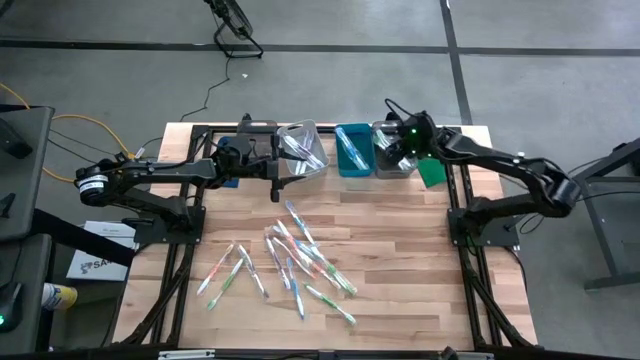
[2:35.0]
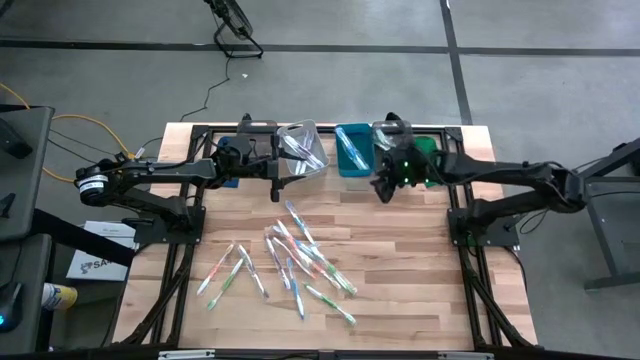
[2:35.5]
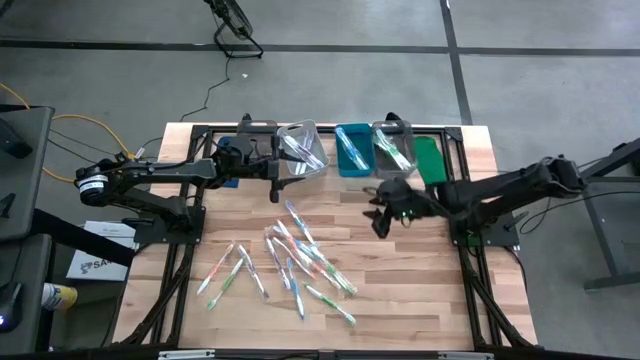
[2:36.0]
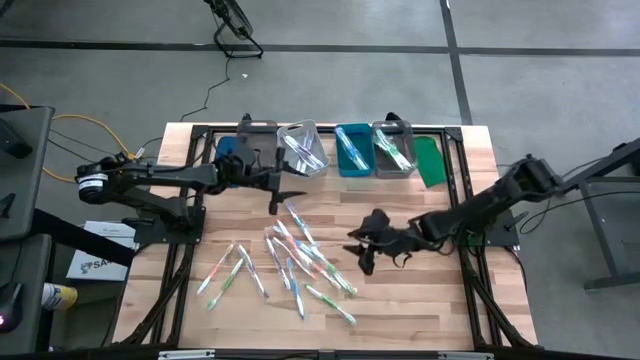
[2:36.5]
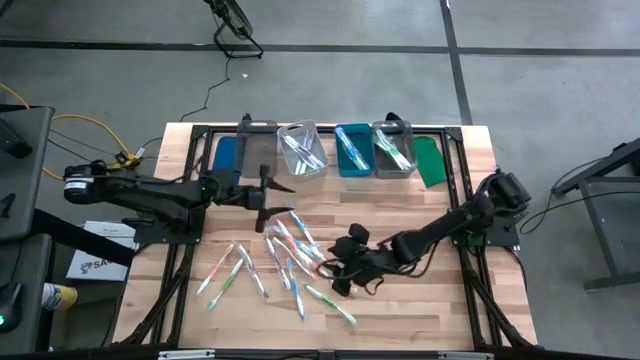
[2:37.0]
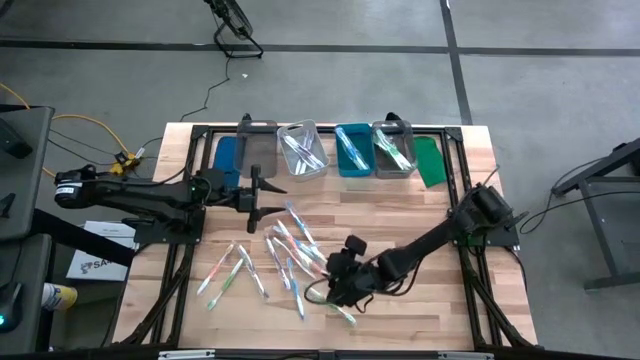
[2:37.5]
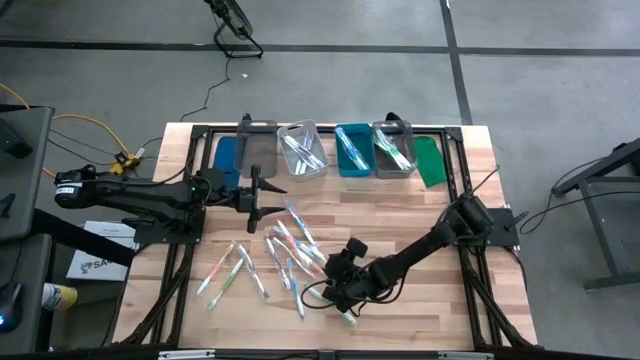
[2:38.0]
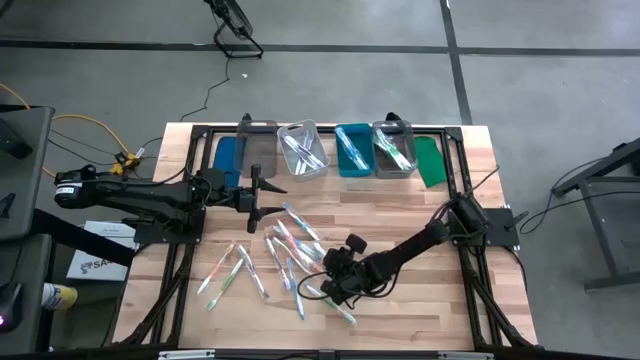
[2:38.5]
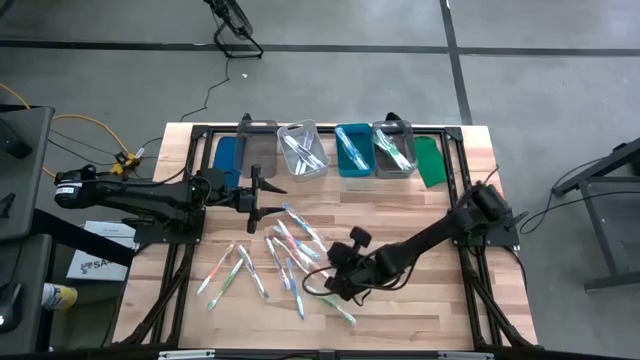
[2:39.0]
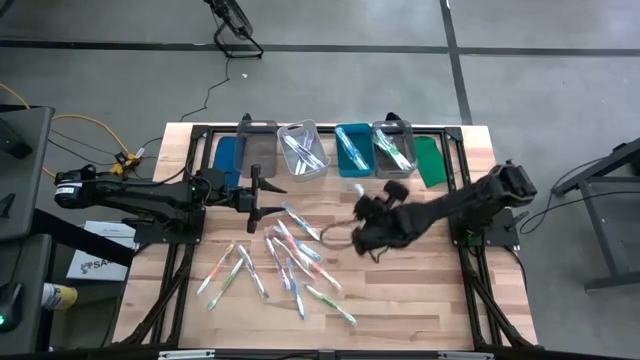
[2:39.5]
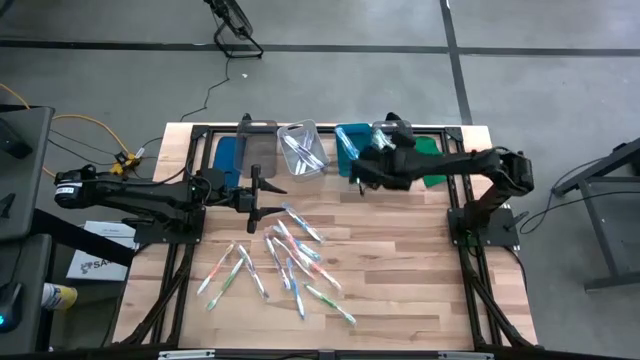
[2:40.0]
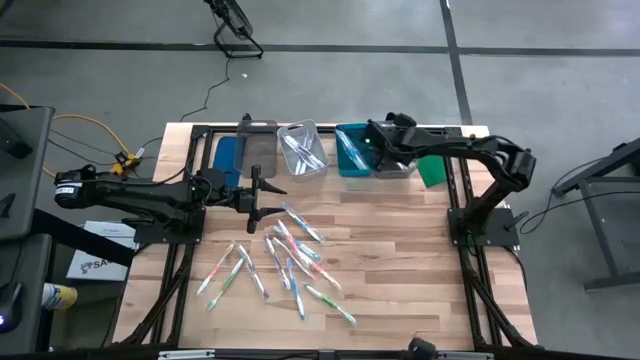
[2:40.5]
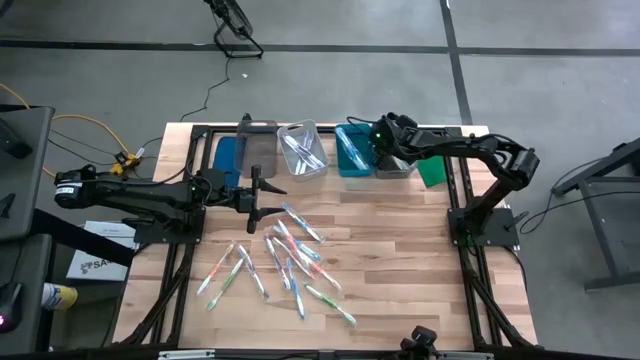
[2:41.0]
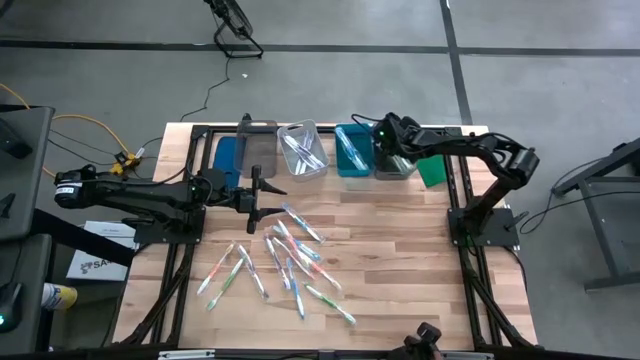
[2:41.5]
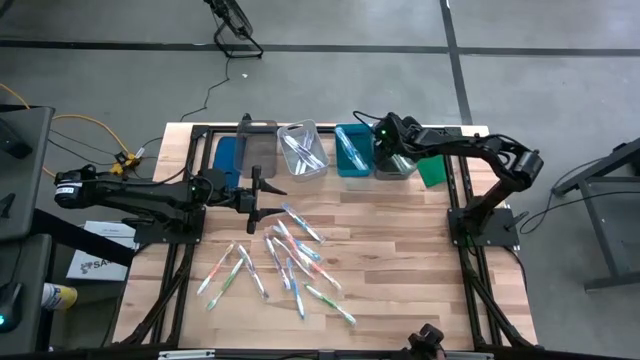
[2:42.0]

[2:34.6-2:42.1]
Task: Pick & Place Toothbrushes
Put the green toothbrush into the right black bin

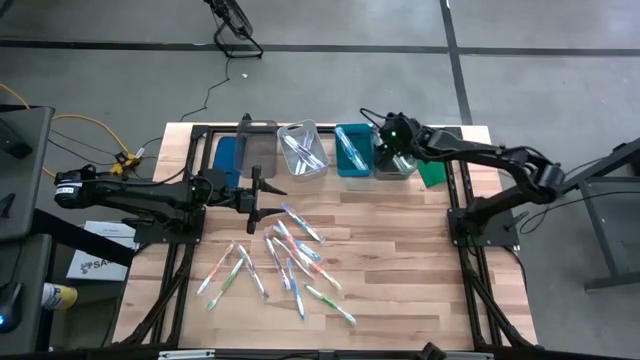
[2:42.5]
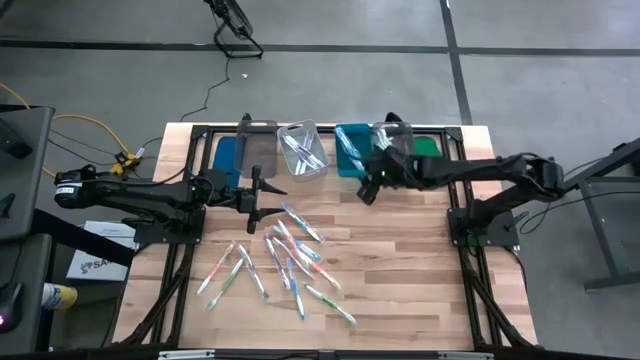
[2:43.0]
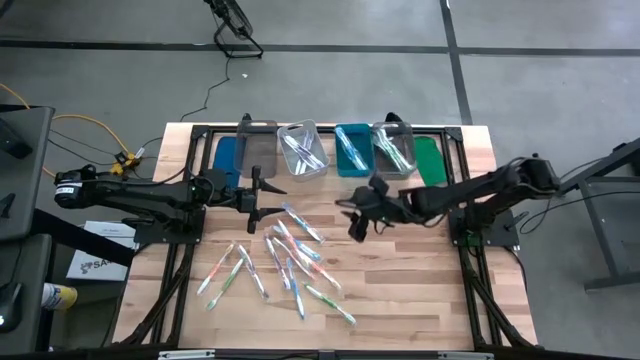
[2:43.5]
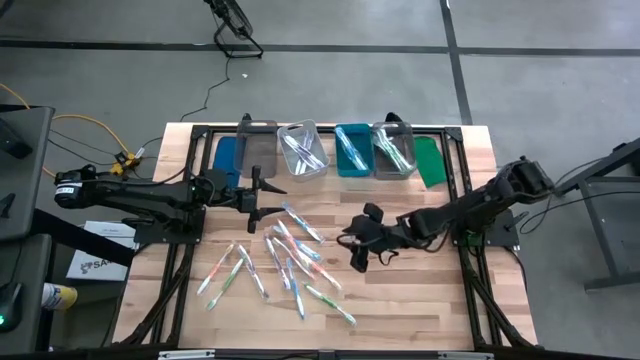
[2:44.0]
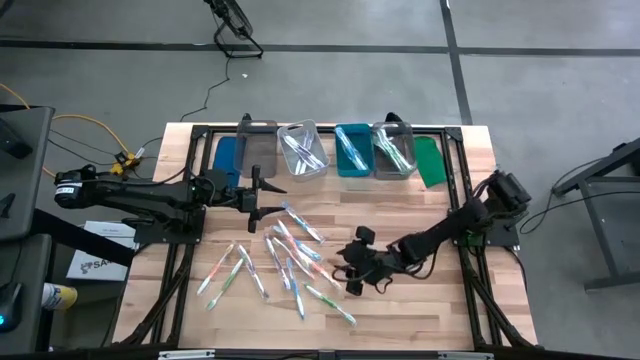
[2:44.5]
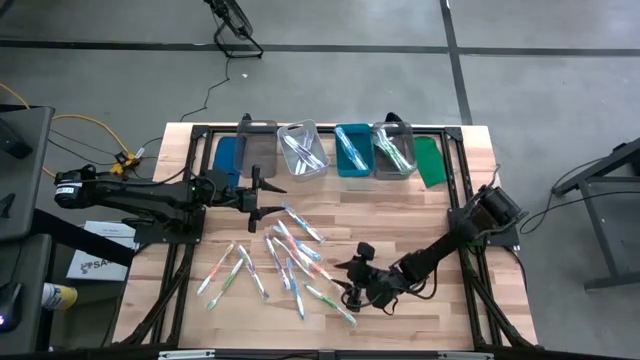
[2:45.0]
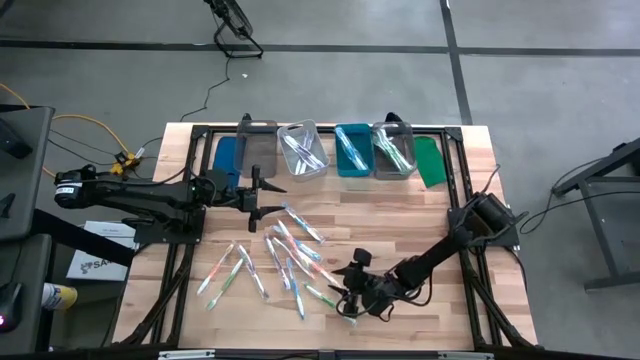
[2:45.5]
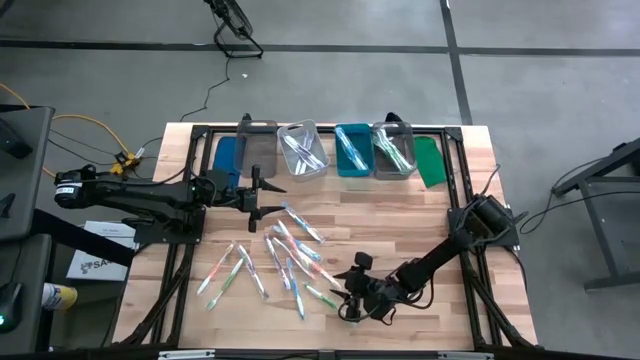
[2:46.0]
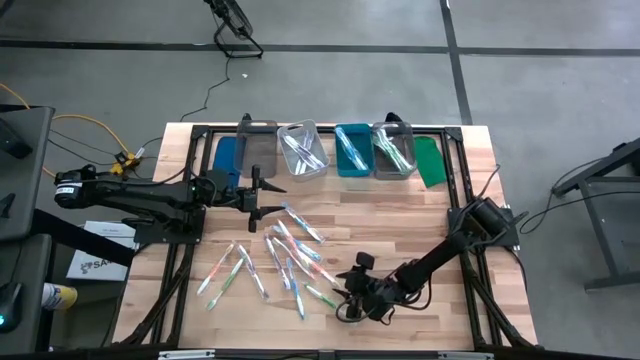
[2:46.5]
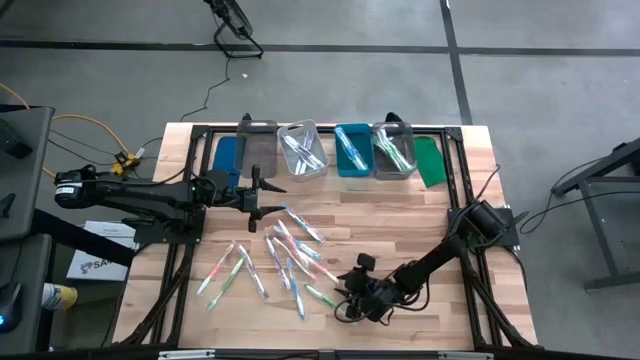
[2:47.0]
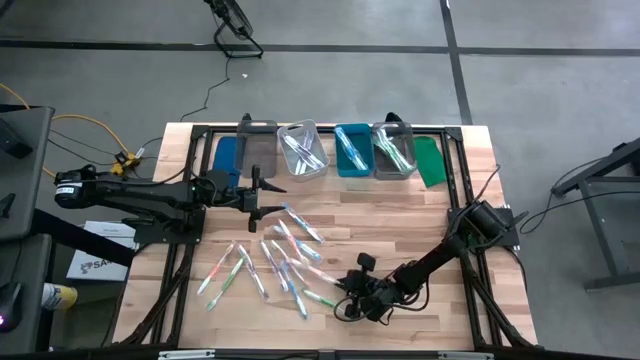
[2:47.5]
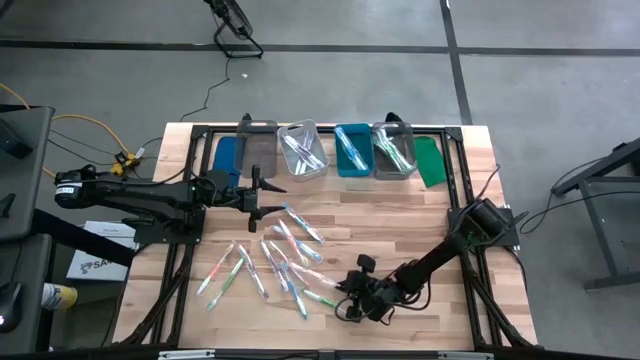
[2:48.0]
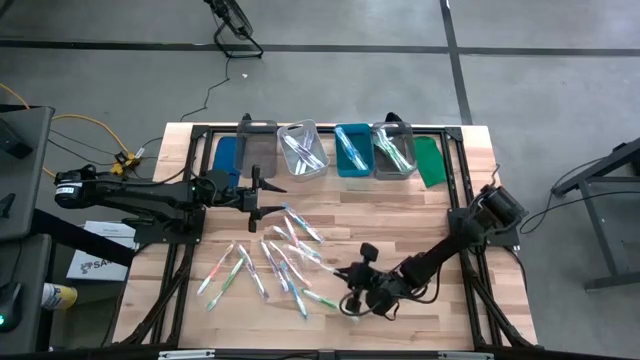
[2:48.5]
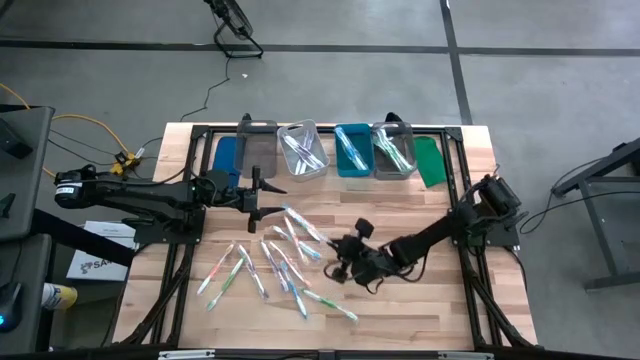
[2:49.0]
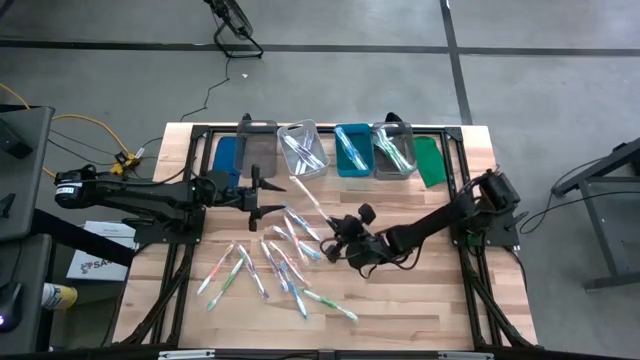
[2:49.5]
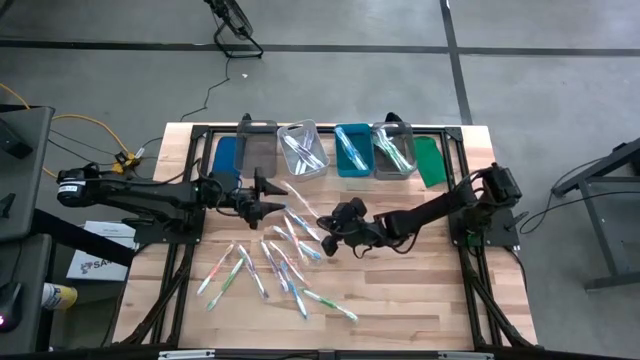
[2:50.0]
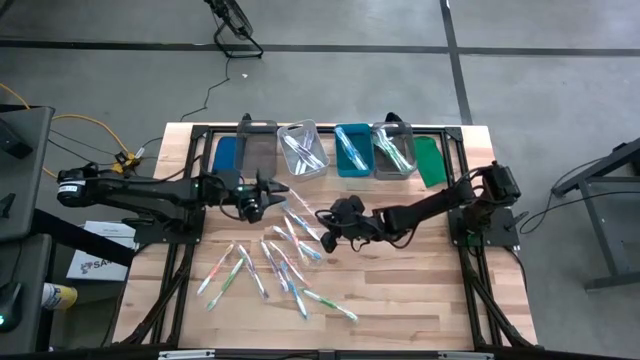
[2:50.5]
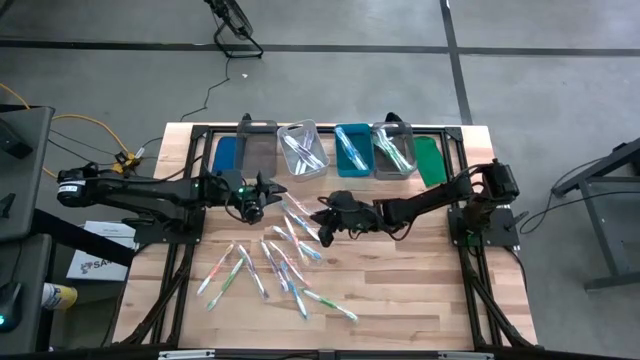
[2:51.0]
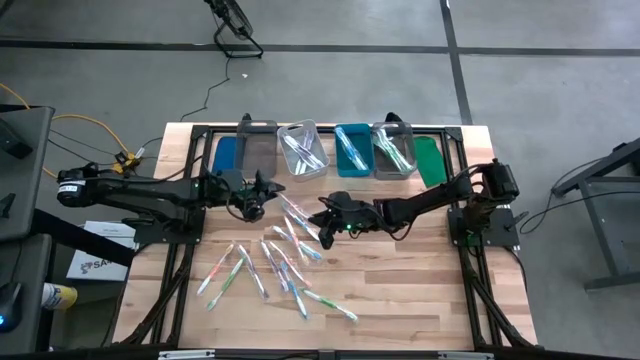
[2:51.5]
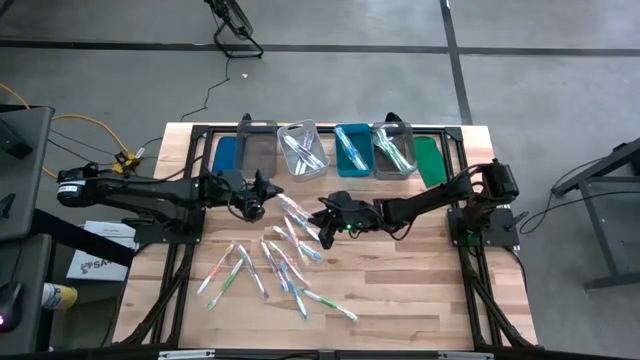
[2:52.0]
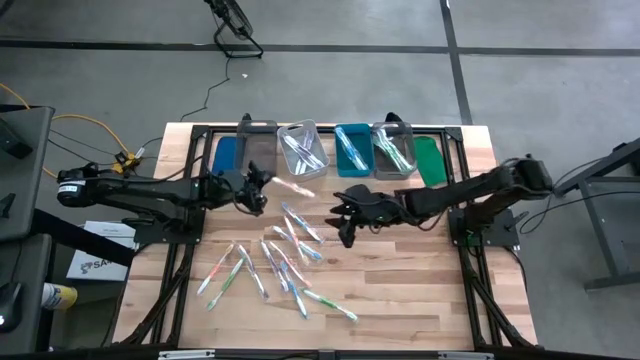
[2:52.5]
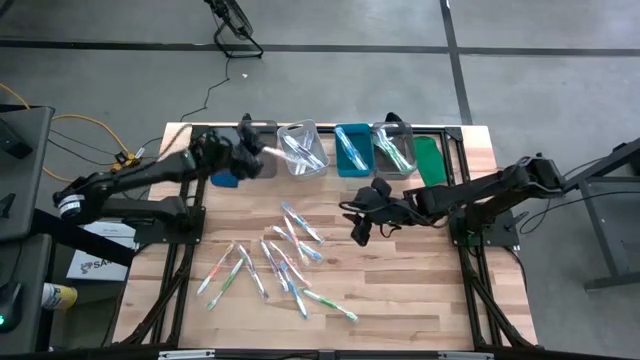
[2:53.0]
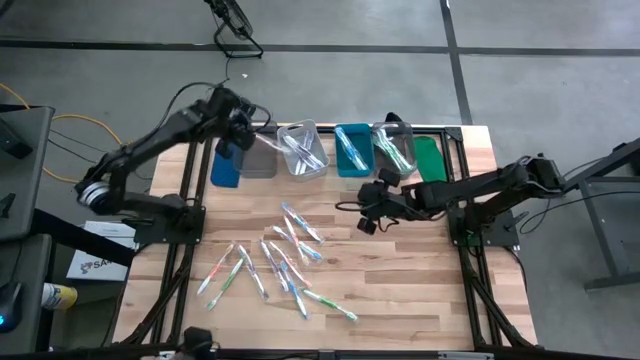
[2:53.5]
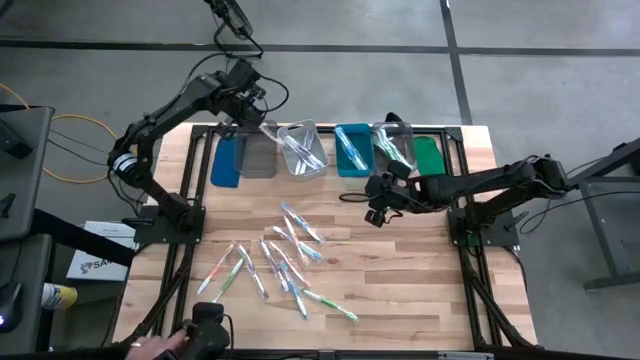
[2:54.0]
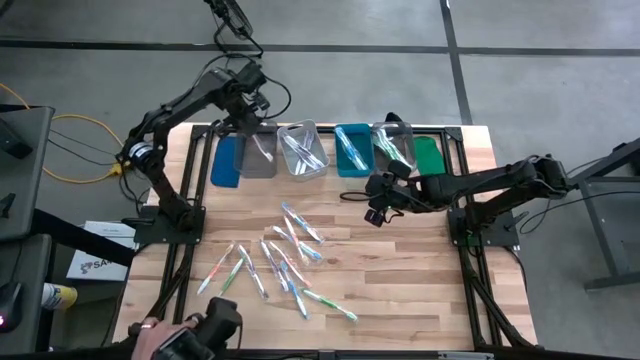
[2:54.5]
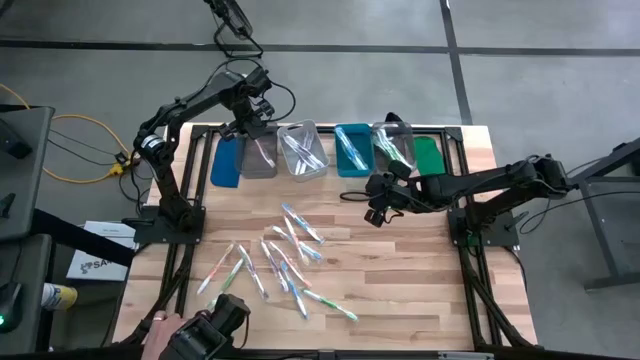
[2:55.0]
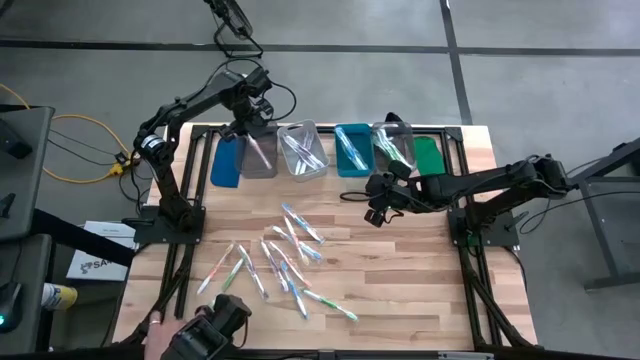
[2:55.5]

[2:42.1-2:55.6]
Put the orange toothbrush into the left black bin
